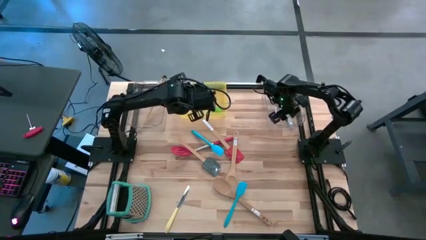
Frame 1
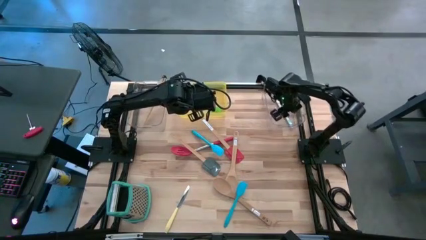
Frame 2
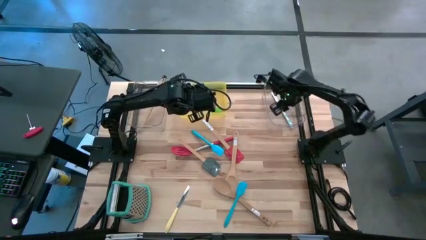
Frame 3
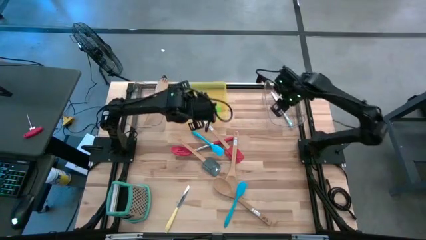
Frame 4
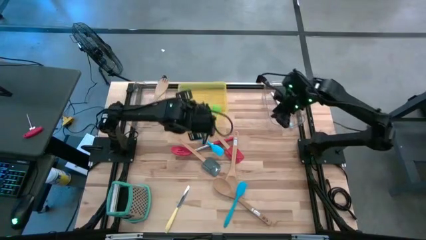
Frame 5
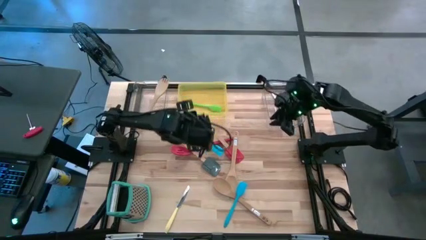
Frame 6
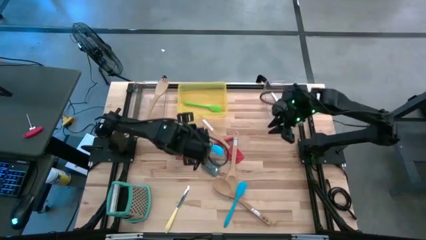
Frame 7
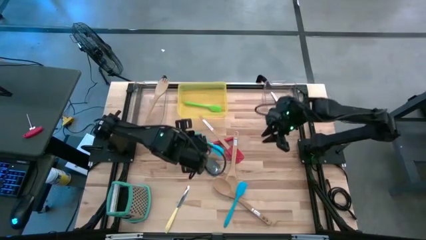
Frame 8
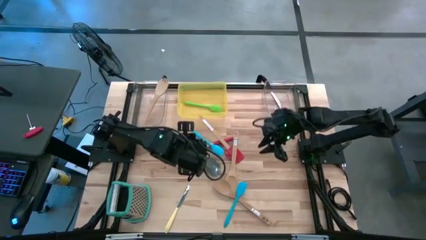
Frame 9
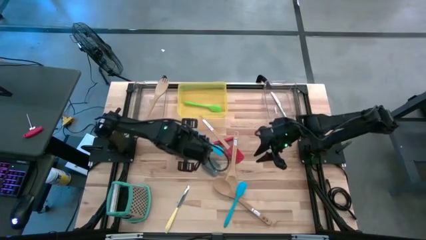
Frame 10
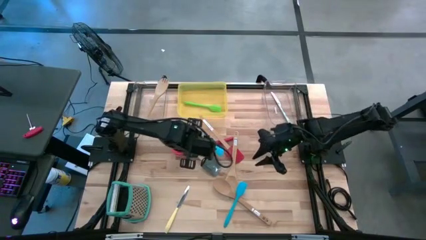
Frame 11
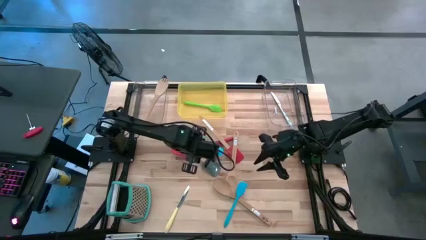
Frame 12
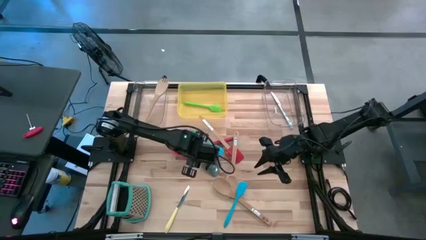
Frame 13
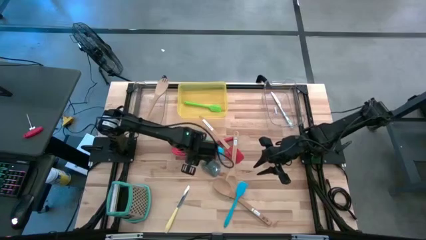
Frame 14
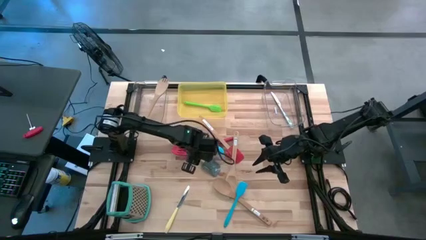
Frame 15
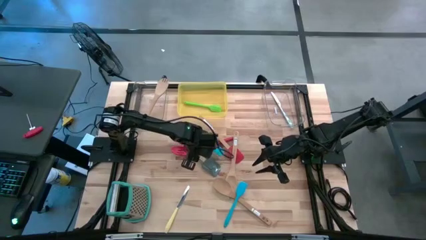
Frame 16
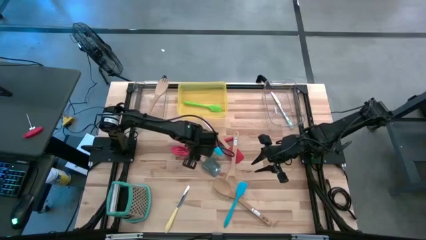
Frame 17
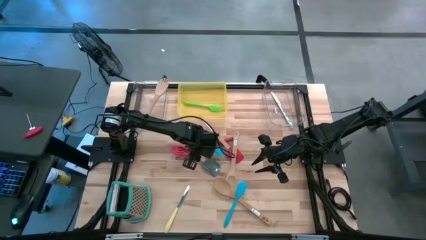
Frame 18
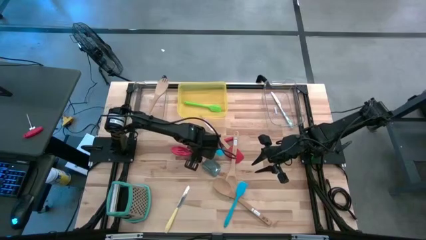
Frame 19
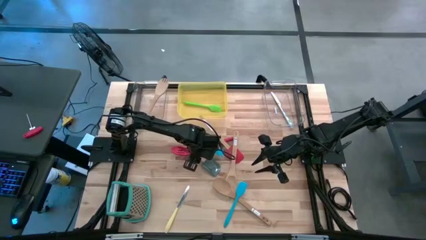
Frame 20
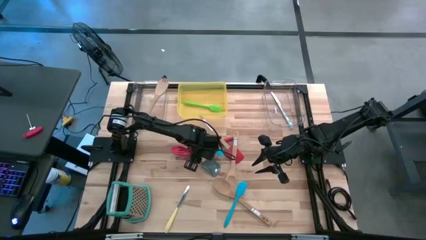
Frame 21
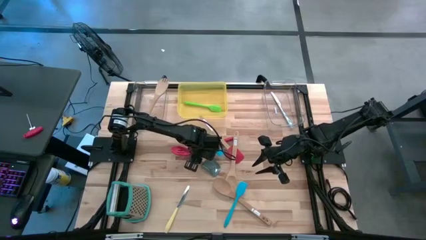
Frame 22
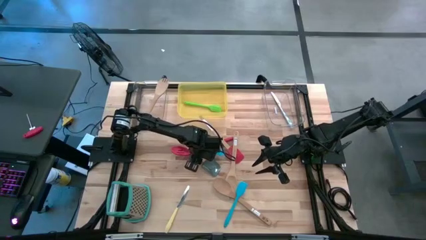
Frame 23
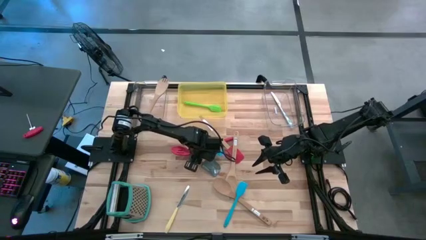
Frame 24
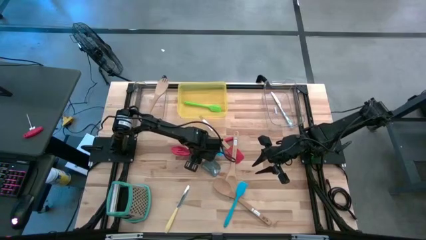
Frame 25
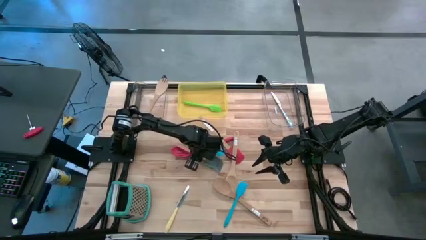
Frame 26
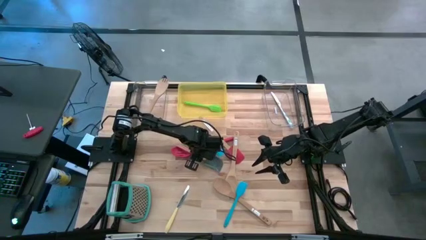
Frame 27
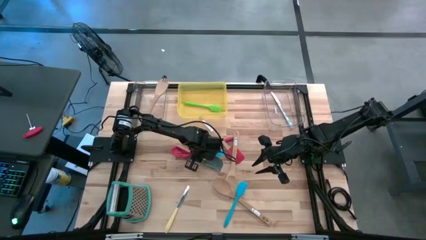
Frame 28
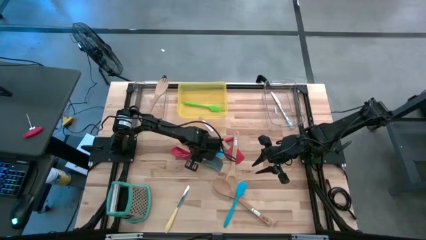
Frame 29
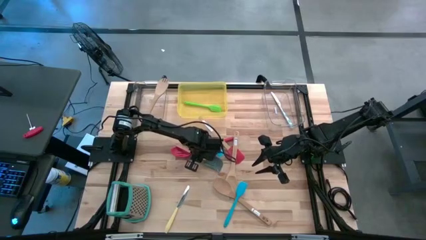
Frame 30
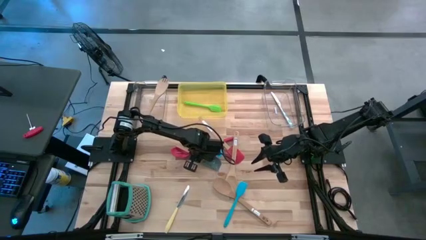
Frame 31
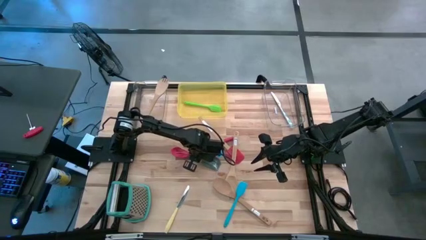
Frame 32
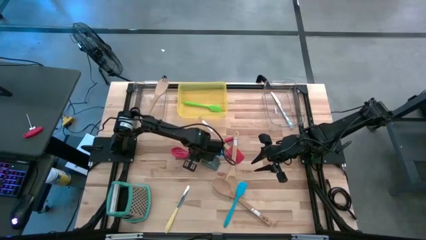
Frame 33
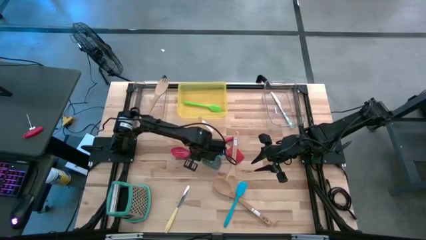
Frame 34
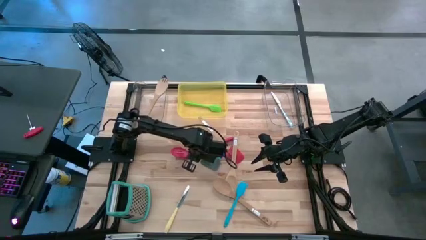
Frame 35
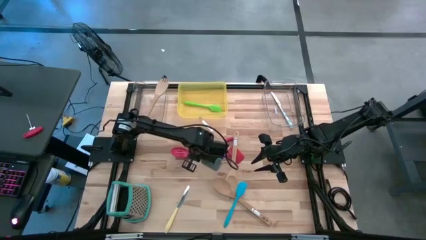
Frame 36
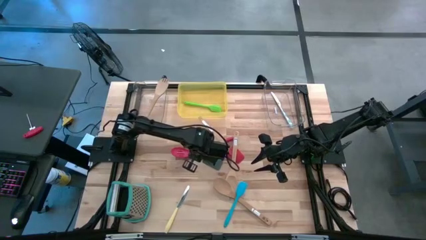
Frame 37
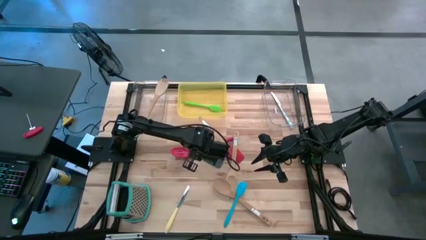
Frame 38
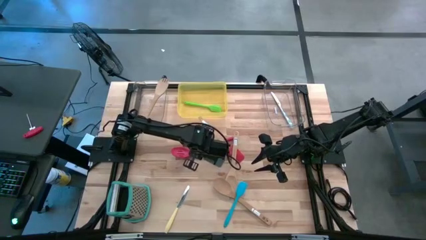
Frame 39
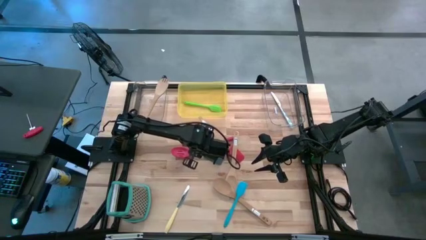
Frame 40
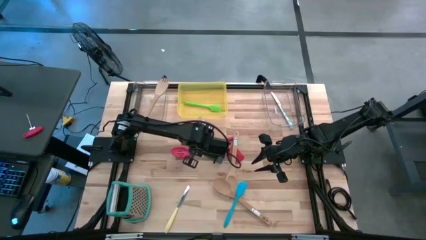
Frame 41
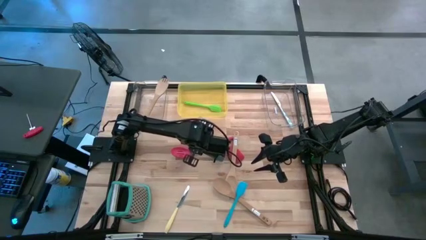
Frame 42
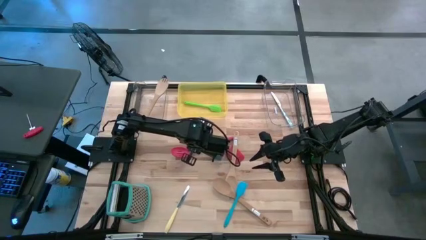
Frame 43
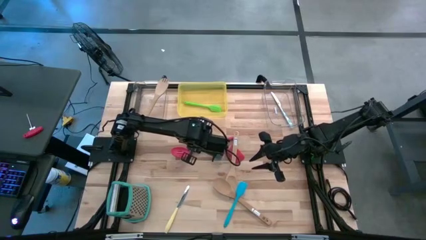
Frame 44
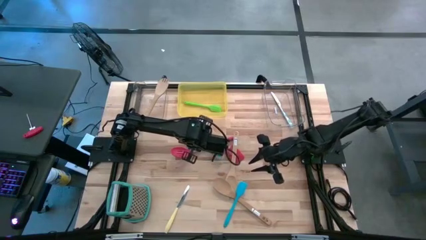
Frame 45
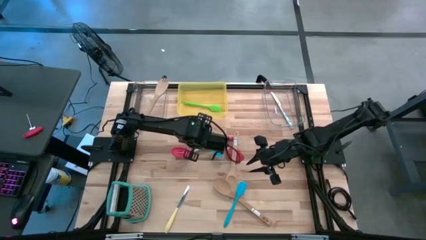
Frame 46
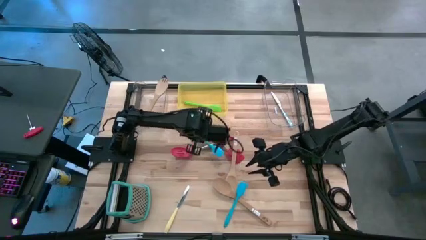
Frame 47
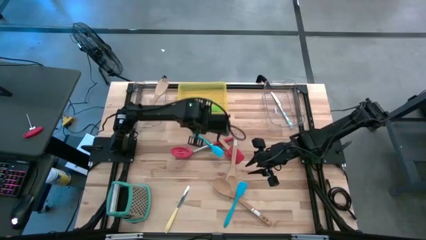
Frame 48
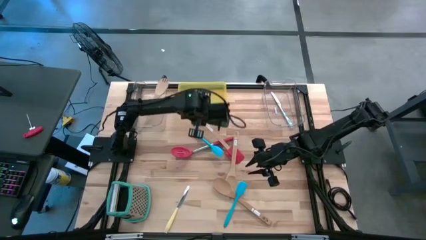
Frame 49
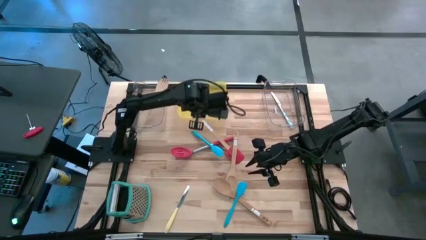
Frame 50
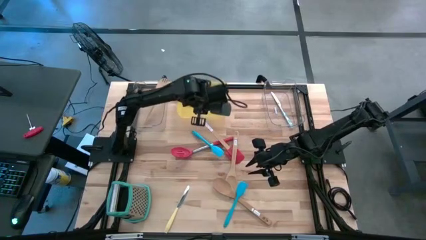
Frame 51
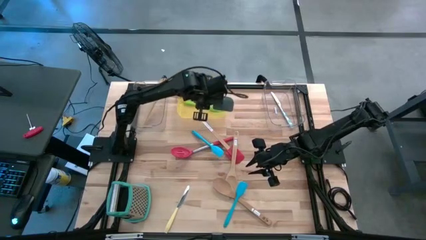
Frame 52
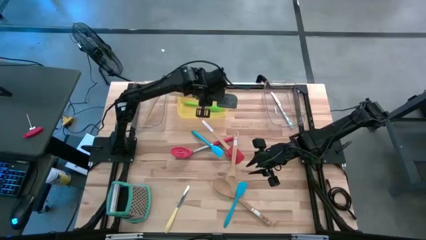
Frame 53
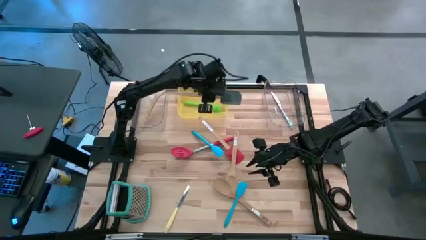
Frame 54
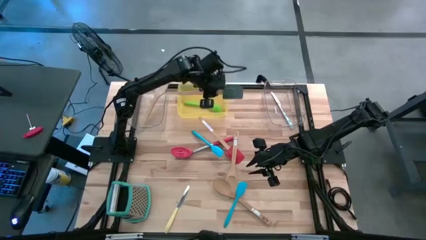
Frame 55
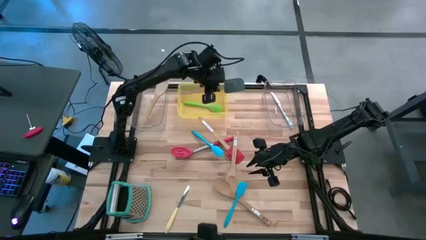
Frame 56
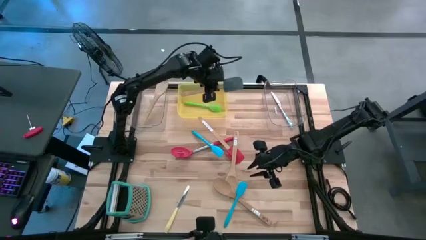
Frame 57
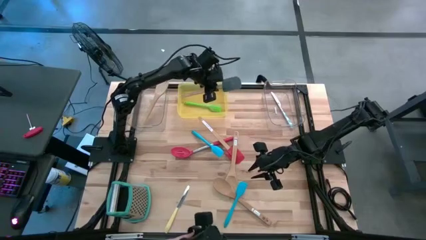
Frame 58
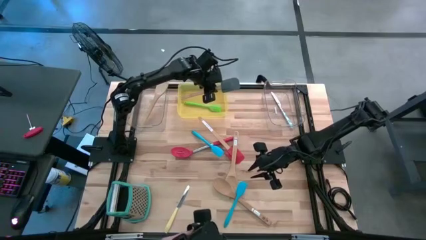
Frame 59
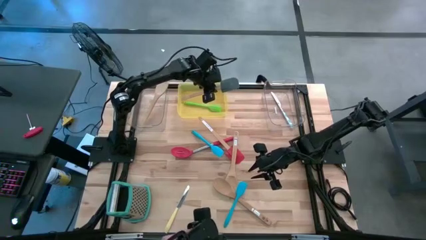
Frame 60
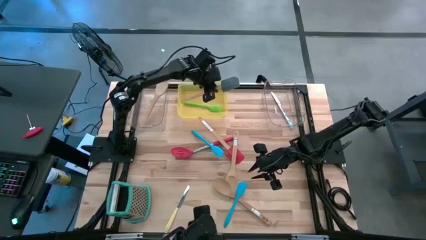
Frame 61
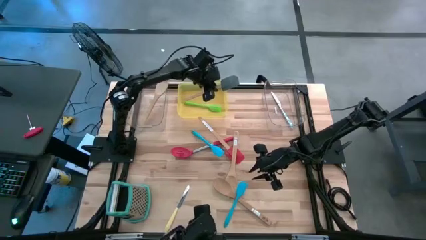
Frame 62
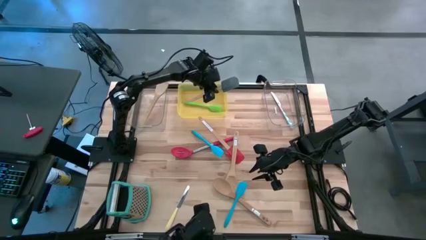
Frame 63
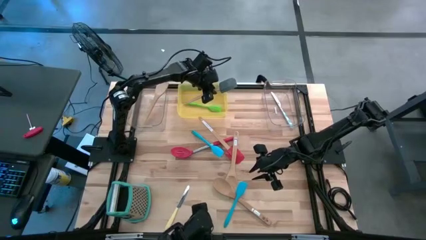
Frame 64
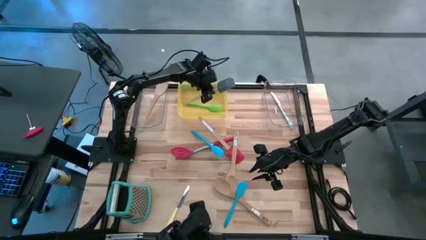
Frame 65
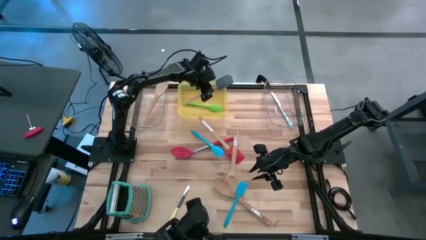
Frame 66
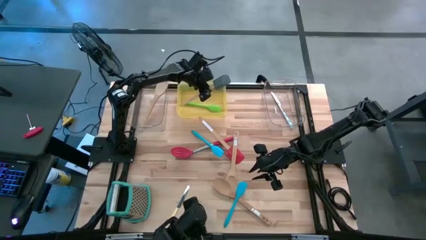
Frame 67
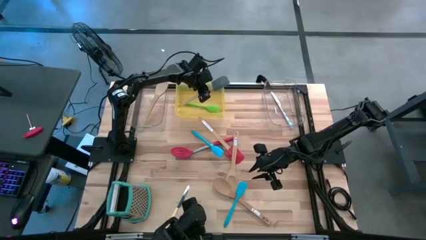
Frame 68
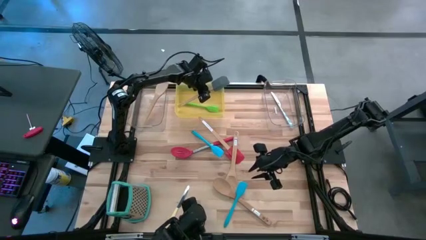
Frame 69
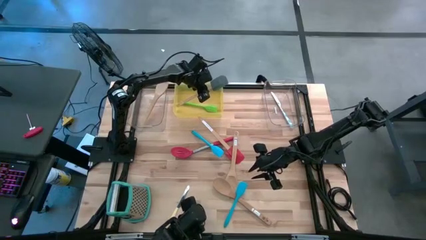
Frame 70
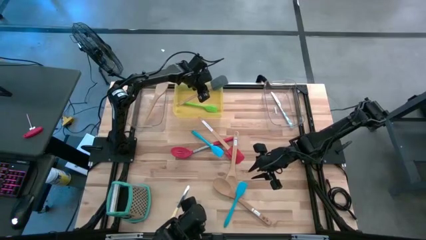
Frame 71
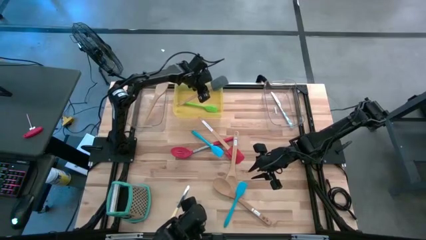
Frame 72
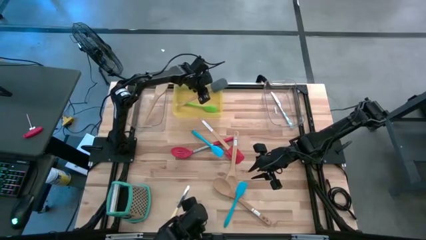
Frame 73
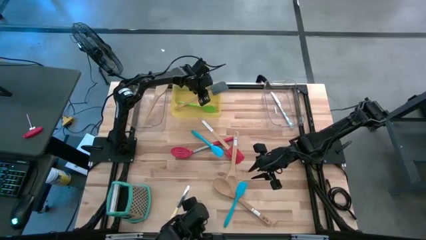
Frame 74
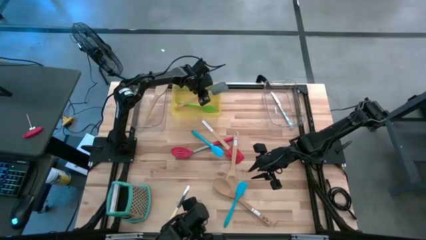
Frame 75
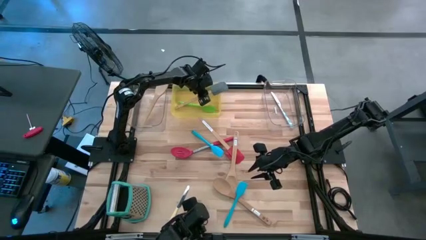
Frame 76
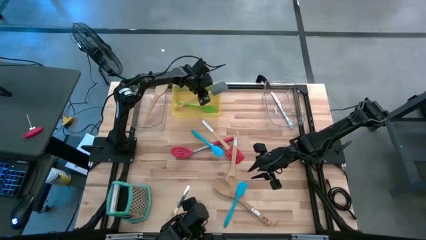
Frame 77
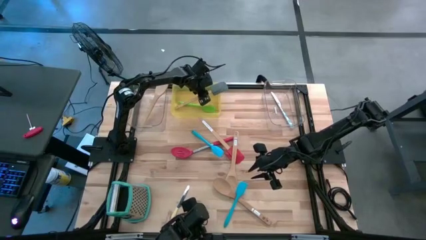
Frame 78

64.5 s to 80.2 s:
Task: Pick & Place Kitchen Items
Put the gray spatula into the yellow bin
